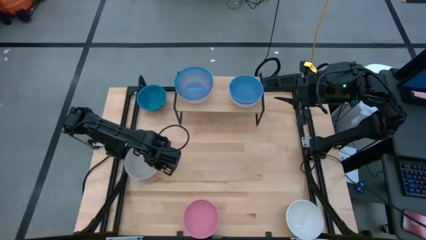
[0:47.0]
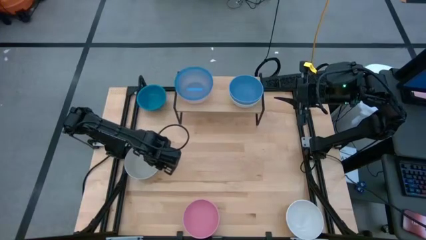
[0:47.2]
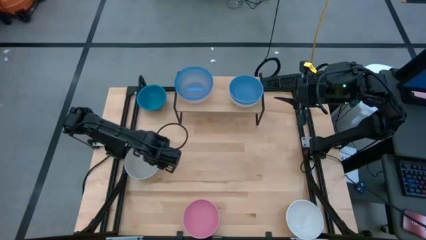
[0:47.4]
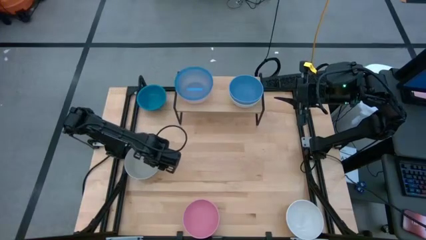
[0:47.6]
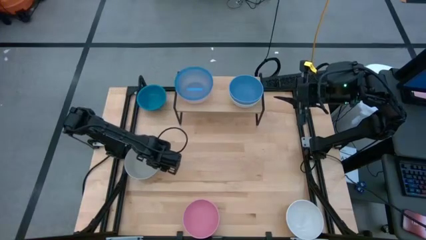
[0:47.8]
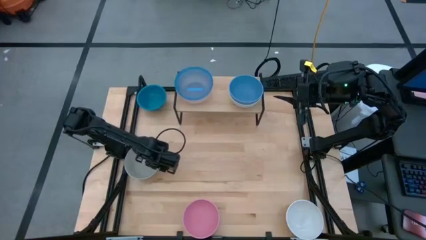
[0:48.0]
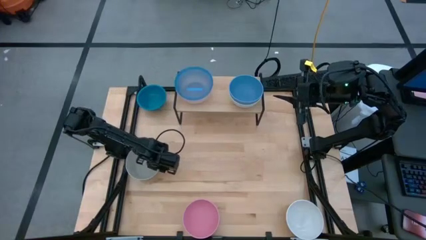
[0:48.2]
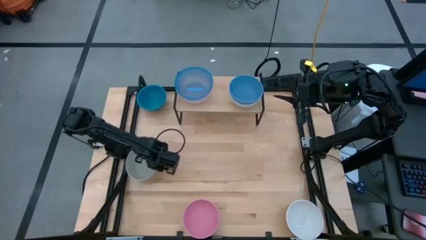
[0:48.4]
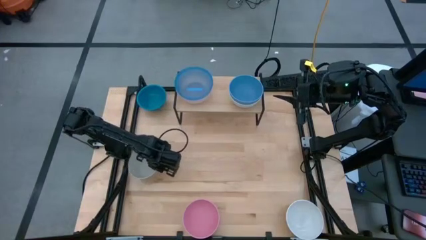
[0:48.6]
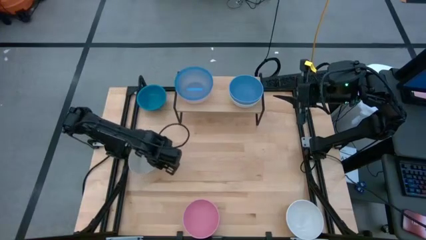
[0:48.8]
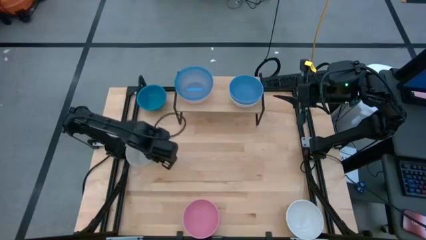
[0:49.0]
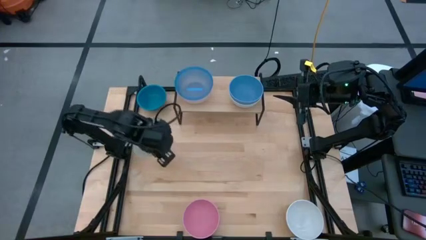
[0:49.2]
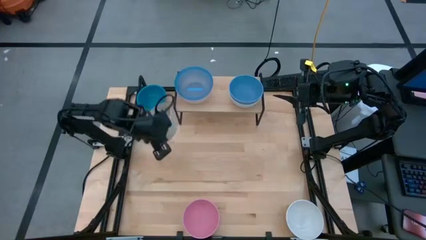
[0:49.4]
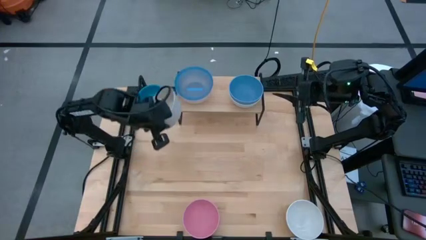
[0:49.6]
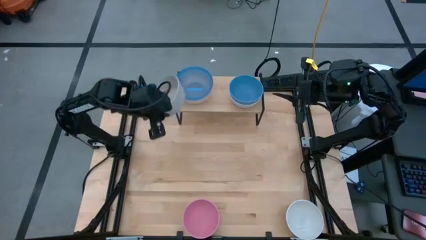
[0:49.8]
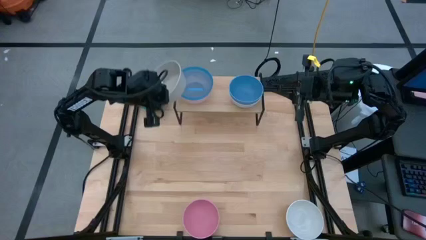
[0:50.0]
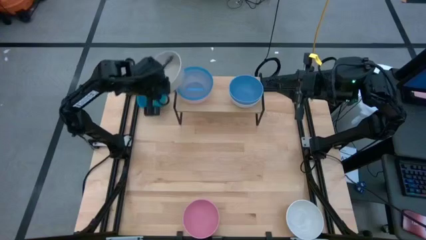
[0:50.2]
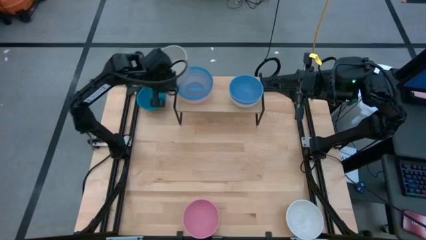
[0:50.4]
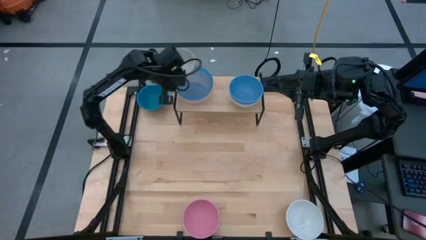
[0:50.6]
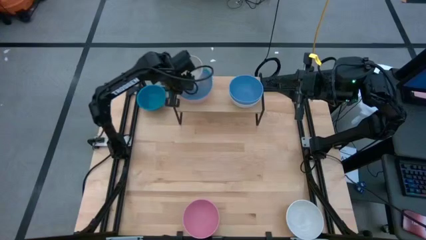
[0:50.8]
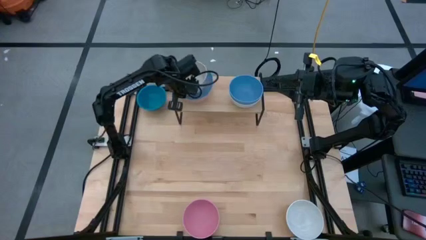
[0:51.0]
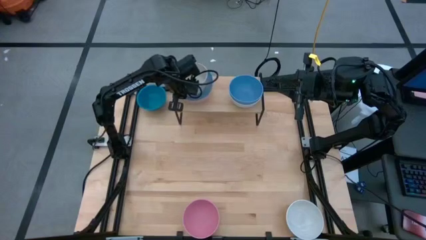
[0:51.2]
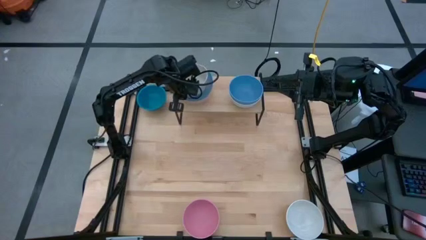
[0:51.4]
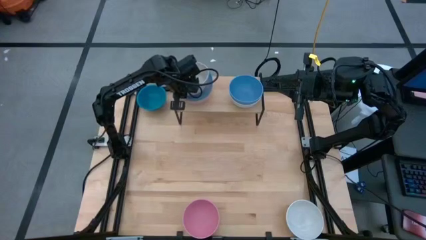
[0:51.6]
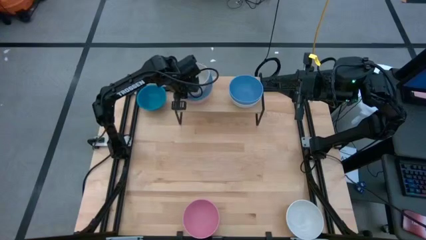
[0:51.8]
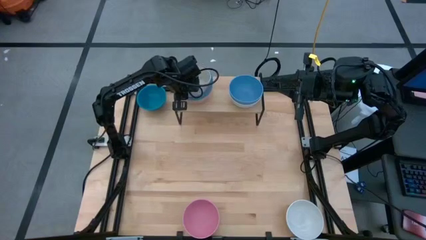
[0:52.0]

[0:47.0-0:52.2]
Task: Place and stack bowls onto a shelf
Stack the gray bowl on top of the blue transparent bowl on the shelf

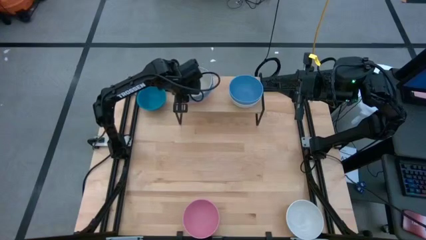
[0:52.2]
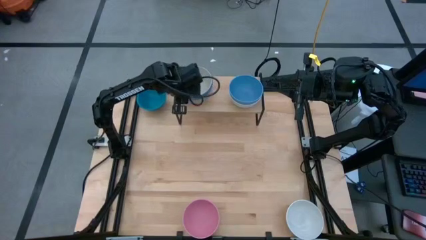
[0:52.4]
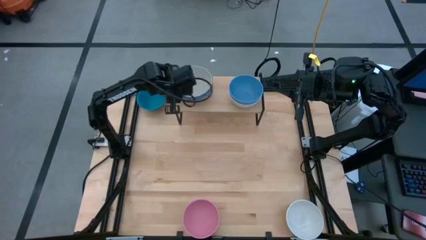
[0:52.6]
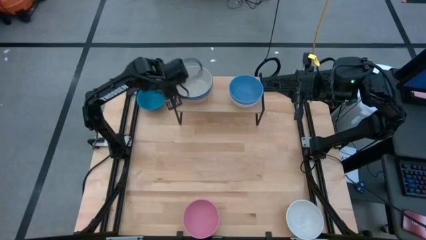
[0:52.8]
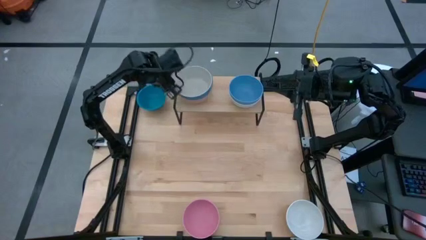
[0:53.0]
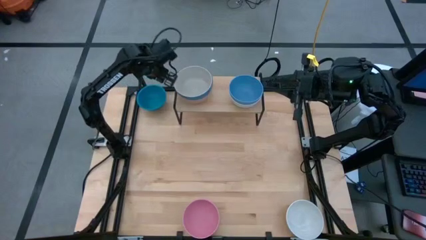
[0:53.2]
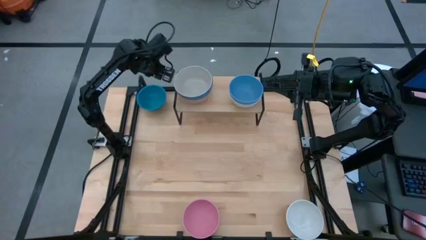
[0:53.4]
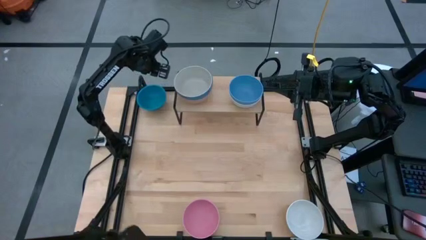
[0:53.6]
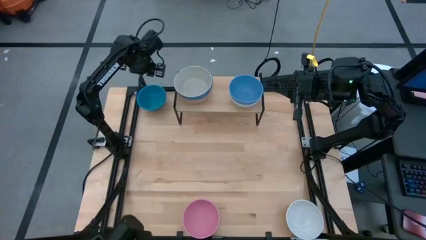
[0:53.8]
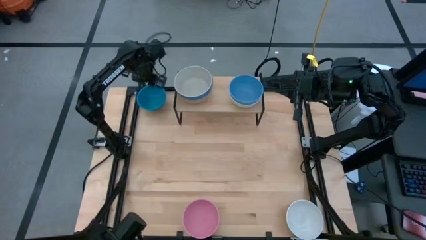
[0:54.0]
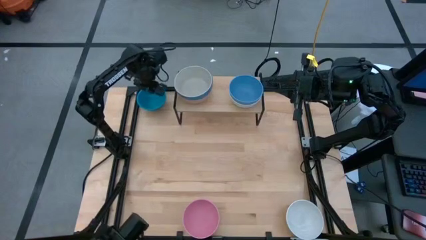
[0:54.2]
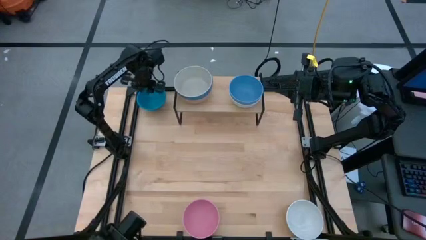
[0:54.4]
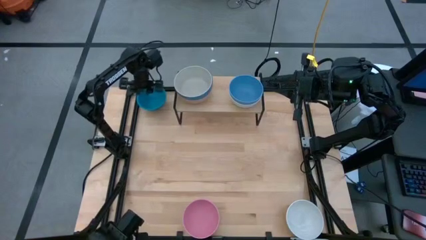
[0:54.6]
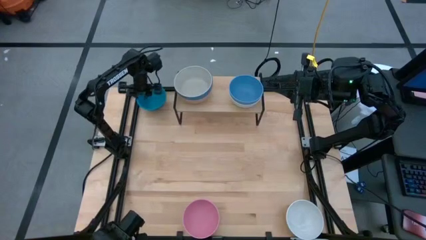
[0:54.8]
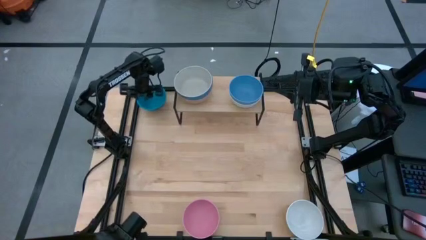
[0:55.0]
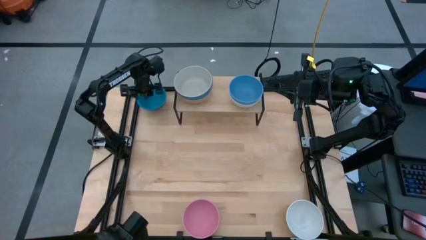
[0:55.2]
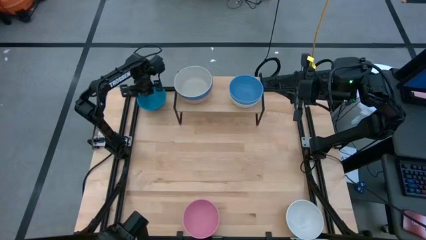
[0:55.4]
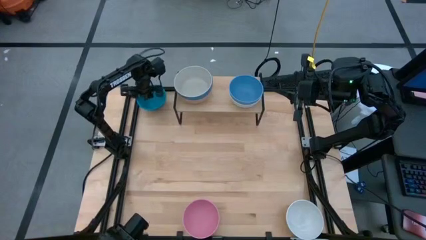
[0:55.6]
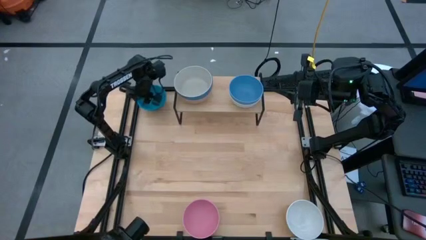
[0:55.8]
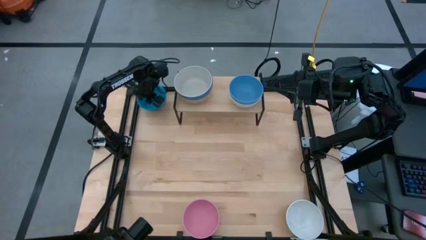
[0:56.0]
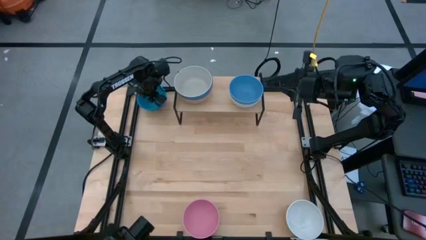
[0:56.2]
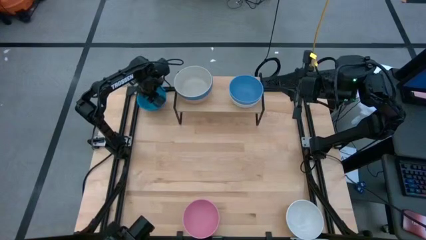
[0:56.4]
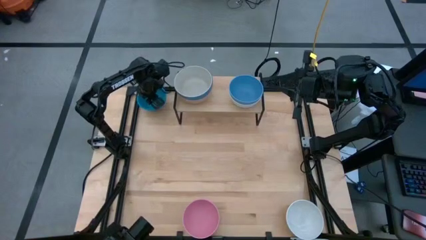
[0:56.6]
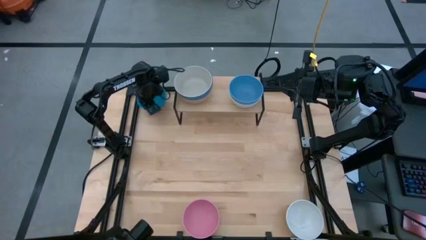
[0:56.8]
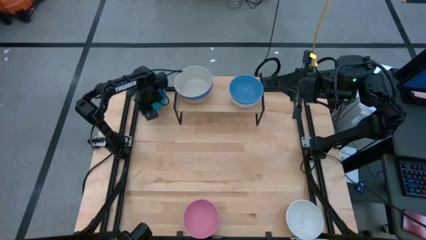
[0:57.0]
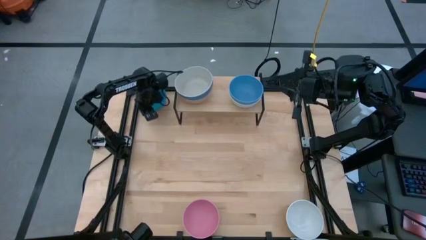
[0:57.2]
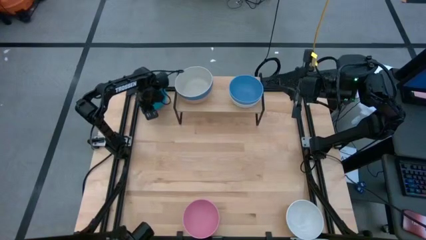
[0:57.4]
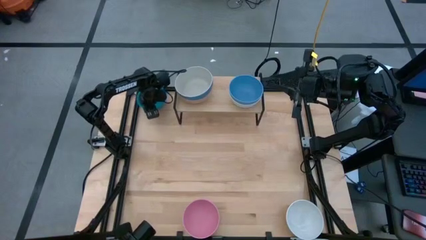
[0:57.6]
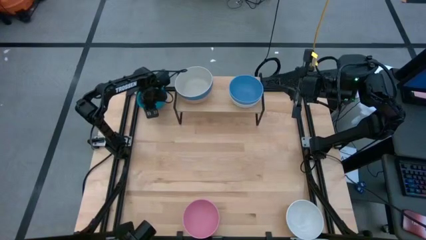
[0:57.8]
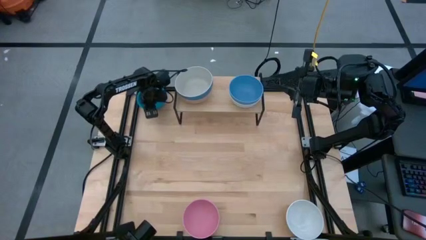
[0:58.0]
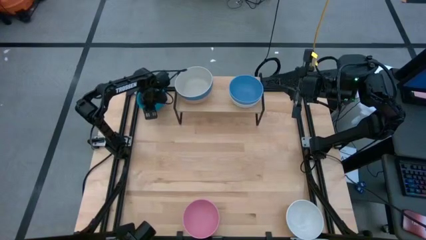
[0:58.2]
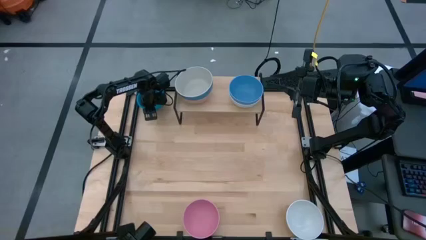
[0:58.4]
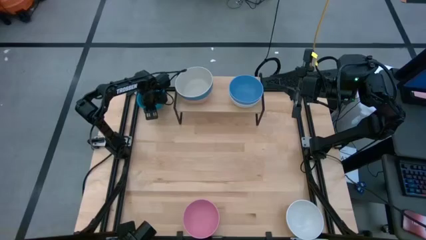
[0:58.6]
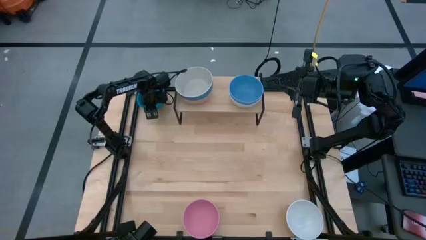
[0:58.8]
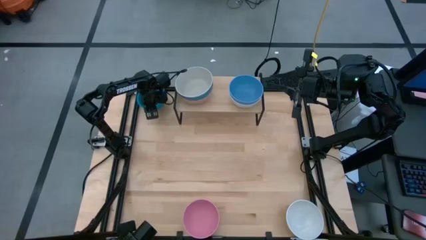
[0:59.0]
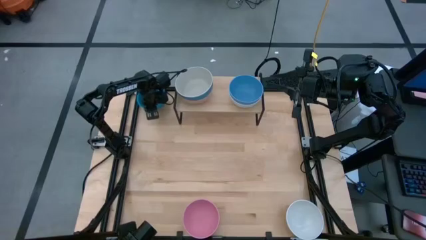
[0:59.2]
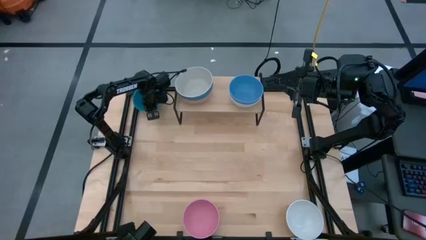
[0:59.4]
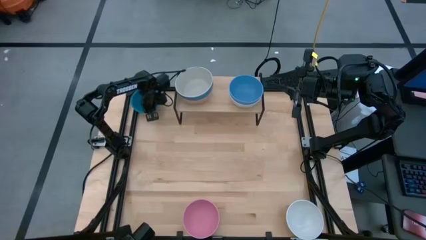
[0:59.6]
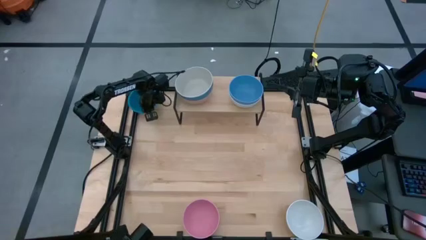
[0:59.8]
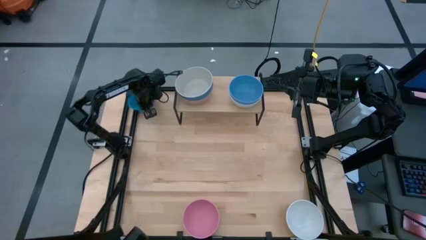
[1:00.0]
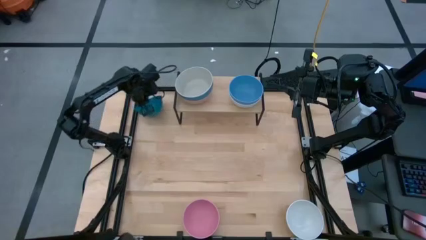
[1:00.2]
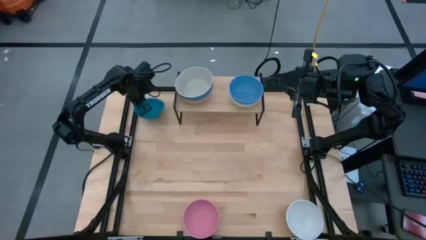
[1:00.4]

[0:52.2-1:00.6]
Stack the blue bowl on top of the gray bowl on the shelf

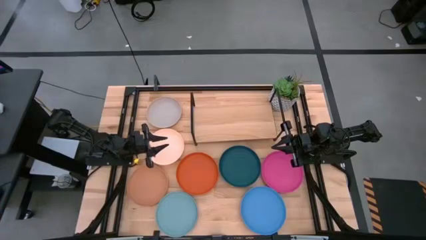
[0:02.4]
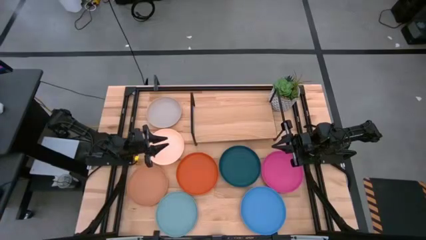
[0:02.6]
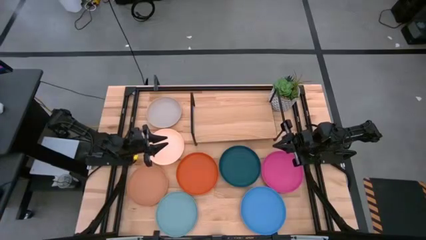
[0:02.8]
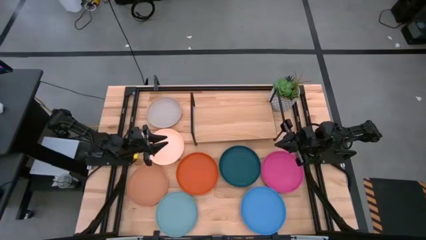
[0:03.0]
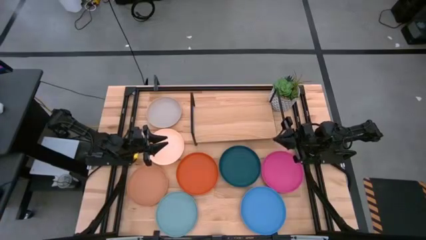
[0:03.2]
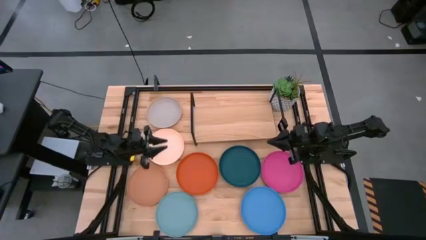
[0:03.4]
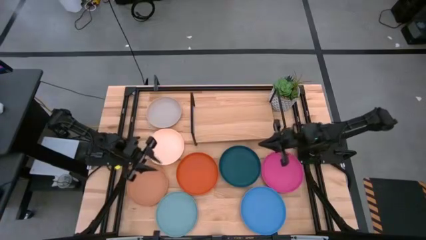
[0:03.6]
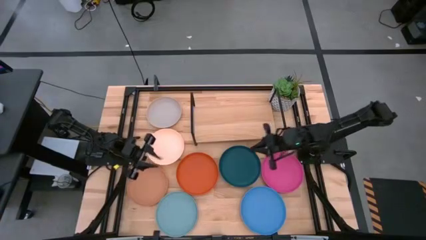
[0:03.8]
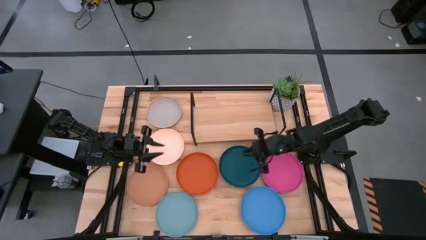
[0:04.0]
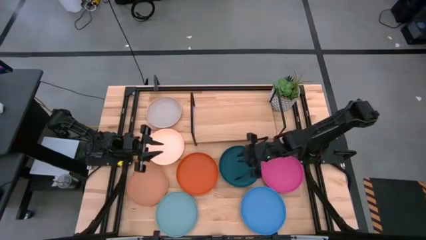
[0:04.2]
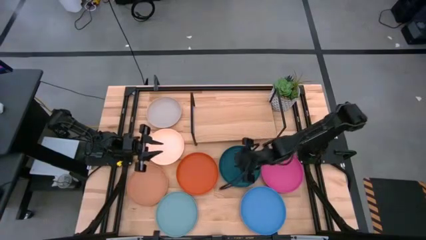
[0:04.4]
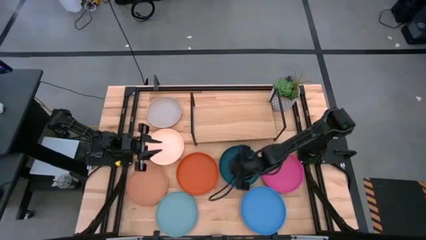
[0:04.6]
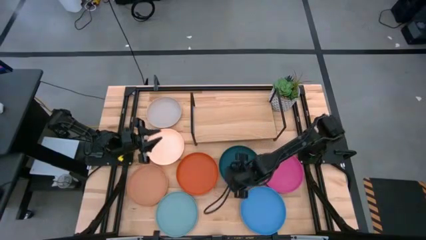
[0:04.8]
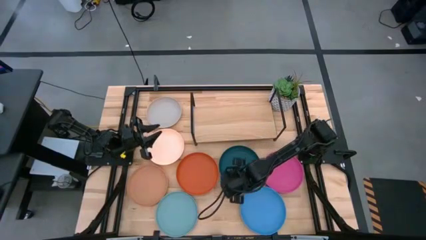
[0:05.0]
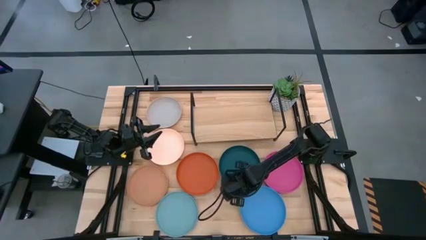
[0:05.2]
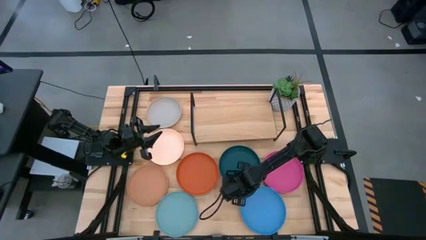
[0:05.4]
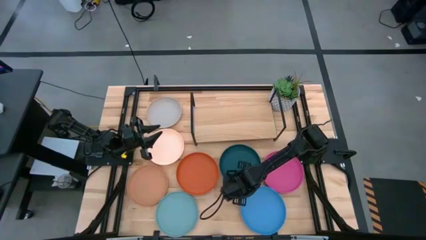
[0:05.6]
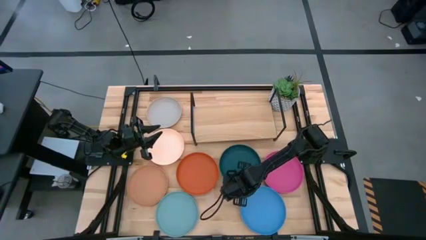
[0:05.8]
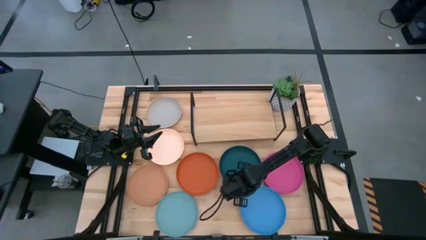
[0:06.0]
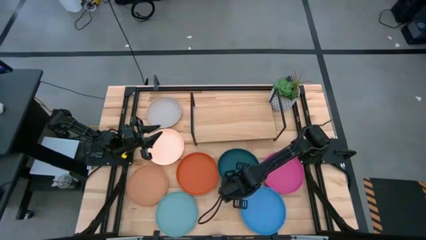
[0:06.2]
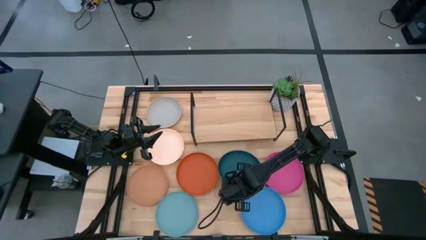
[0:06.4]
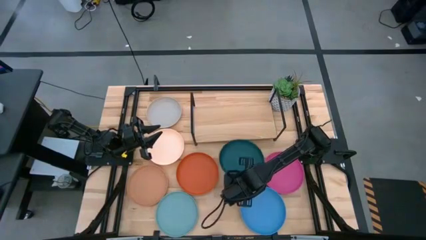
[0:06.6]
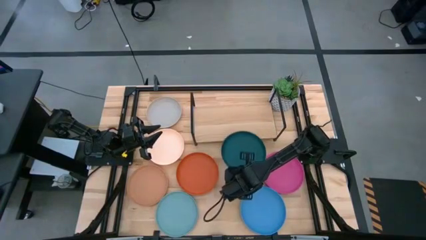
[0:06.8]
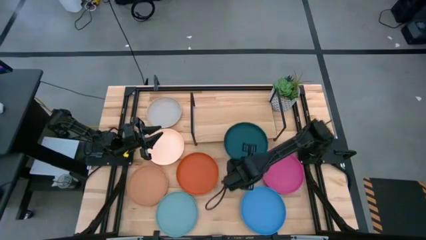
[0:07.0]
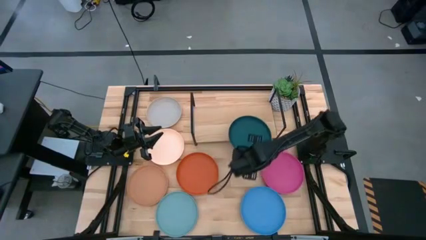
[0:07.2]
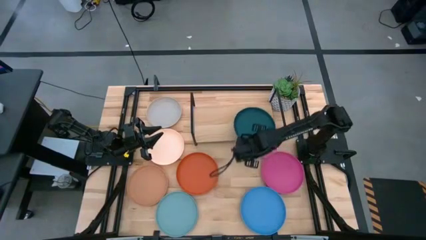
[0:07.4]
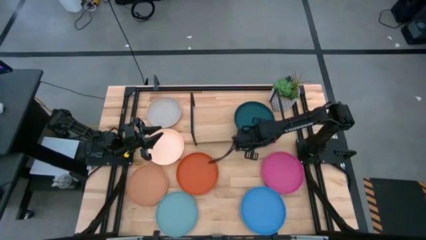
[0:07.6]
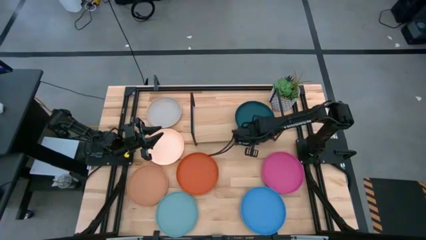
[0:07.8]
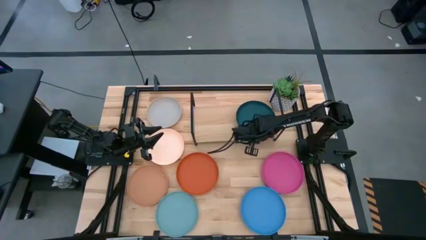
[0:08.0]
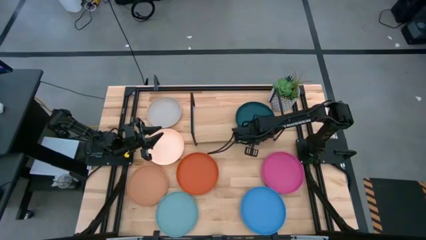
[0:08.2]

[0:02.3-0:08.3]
Task: Place and stack plates onto a shelf
Put the dark green plate on the shelf
